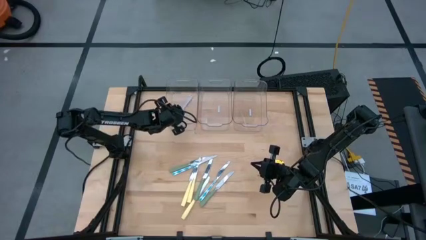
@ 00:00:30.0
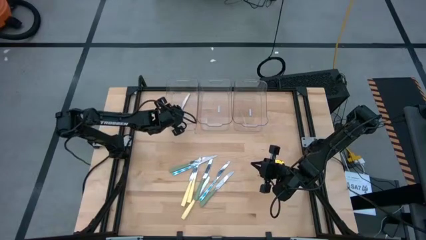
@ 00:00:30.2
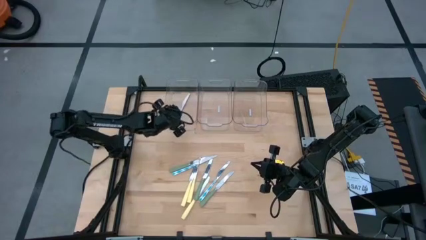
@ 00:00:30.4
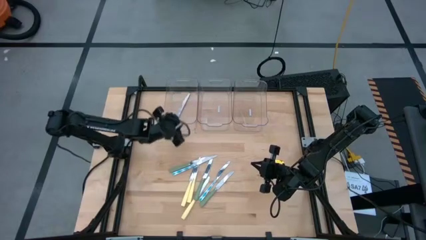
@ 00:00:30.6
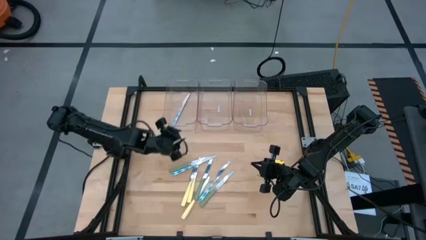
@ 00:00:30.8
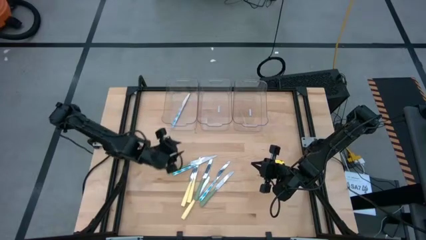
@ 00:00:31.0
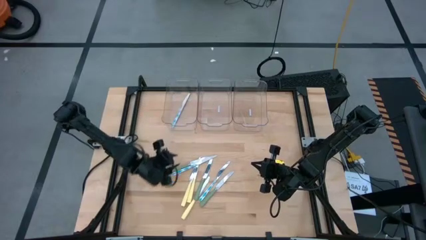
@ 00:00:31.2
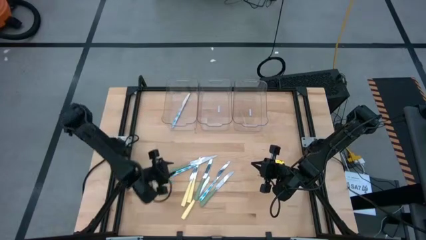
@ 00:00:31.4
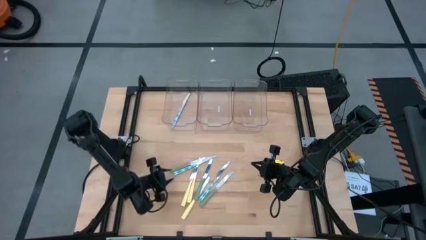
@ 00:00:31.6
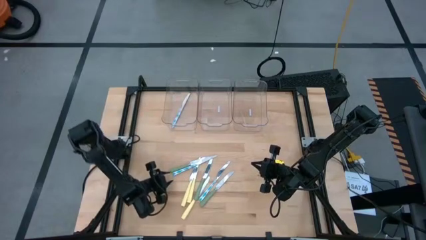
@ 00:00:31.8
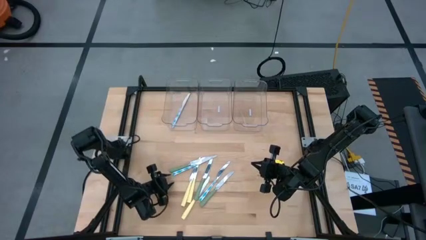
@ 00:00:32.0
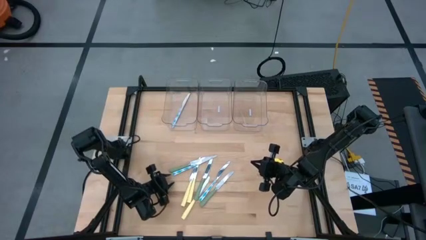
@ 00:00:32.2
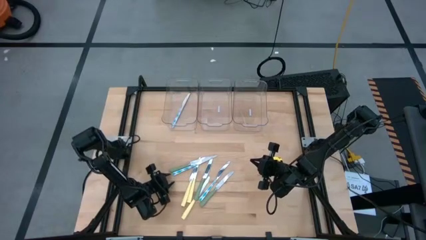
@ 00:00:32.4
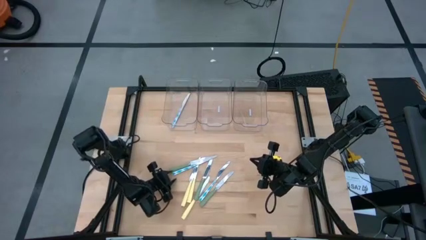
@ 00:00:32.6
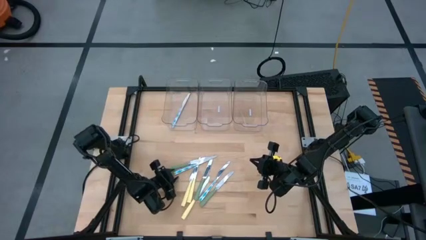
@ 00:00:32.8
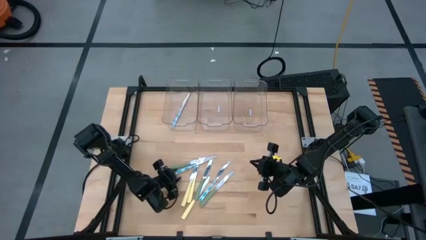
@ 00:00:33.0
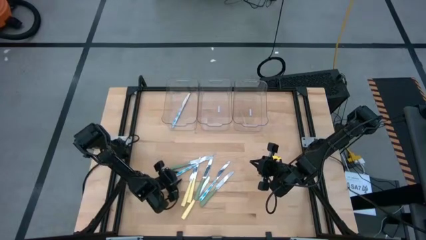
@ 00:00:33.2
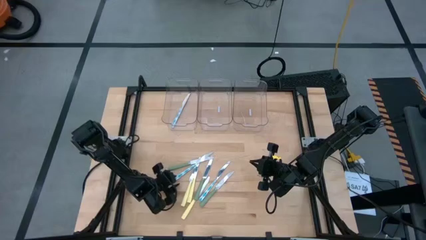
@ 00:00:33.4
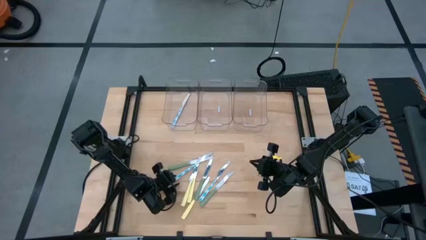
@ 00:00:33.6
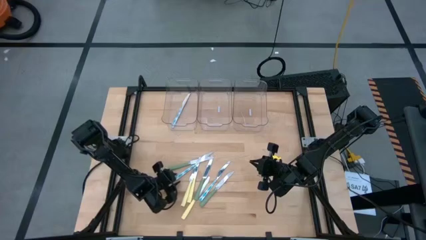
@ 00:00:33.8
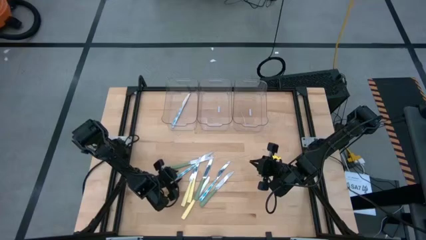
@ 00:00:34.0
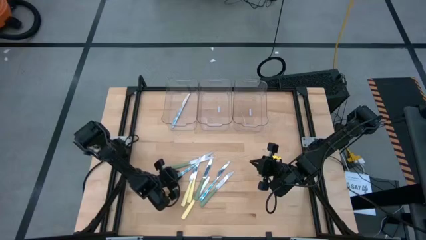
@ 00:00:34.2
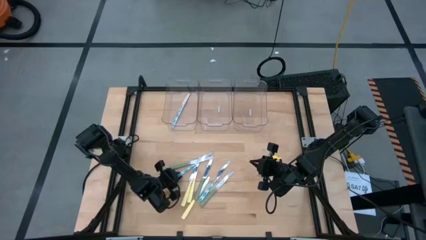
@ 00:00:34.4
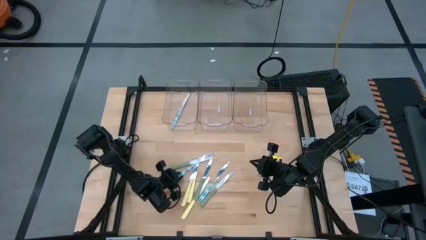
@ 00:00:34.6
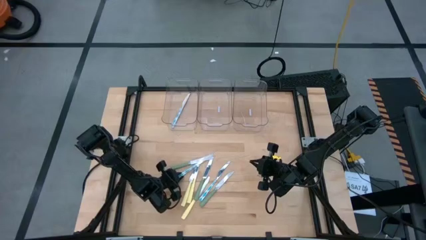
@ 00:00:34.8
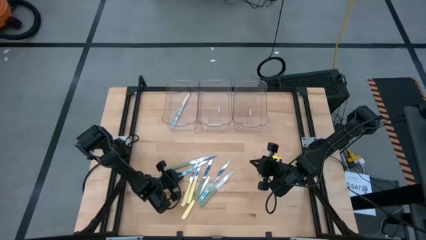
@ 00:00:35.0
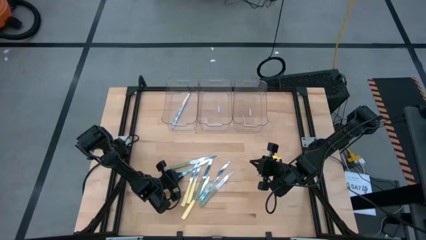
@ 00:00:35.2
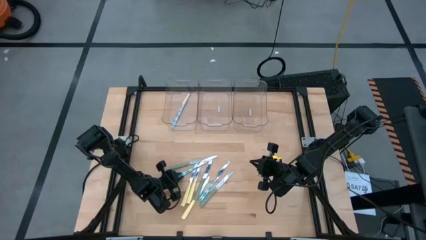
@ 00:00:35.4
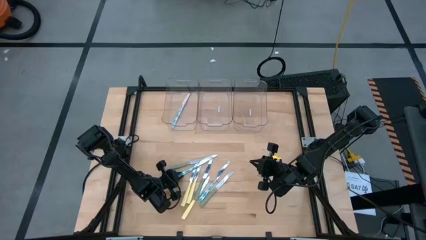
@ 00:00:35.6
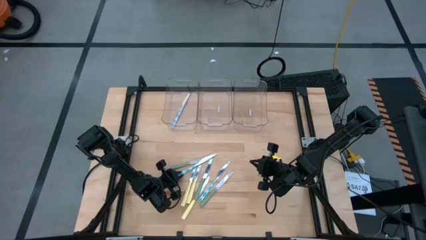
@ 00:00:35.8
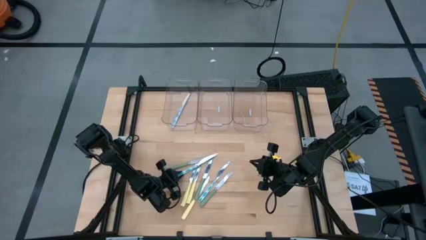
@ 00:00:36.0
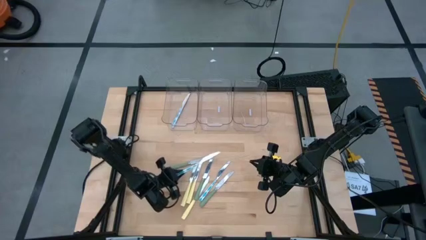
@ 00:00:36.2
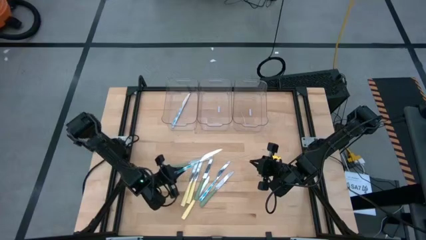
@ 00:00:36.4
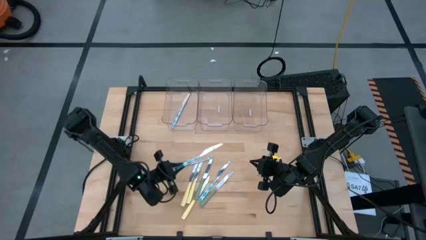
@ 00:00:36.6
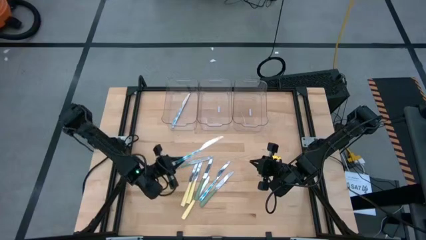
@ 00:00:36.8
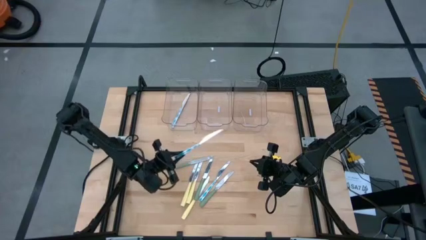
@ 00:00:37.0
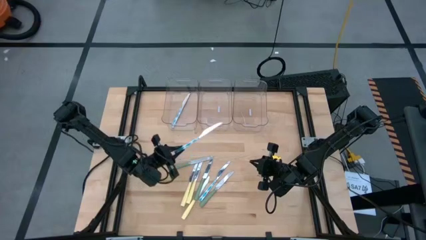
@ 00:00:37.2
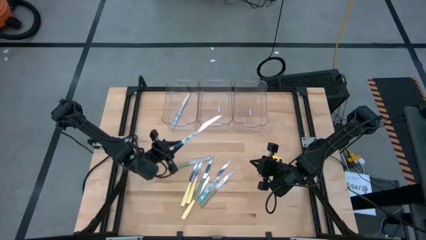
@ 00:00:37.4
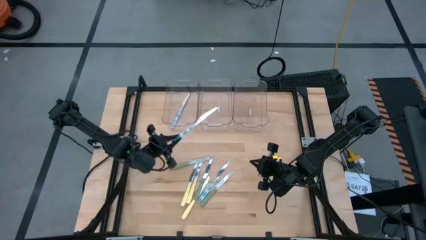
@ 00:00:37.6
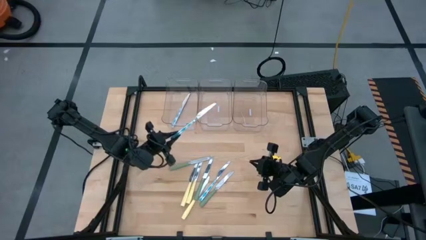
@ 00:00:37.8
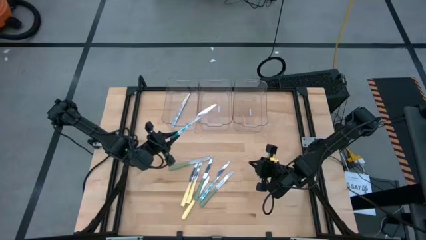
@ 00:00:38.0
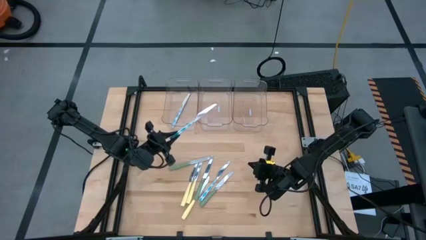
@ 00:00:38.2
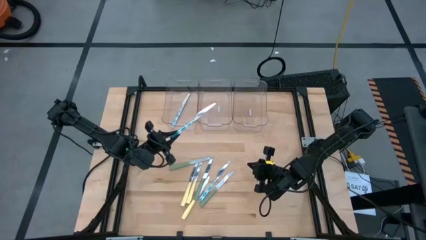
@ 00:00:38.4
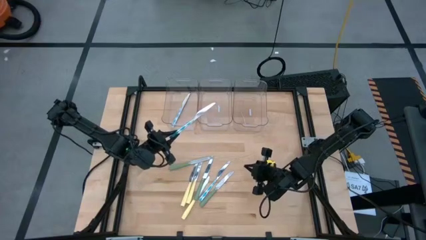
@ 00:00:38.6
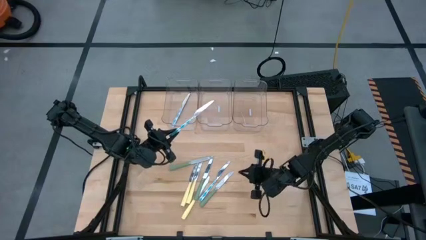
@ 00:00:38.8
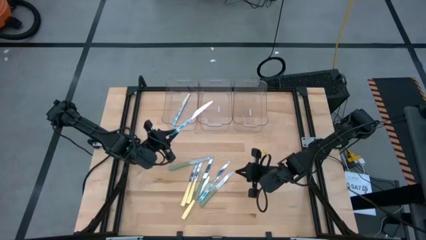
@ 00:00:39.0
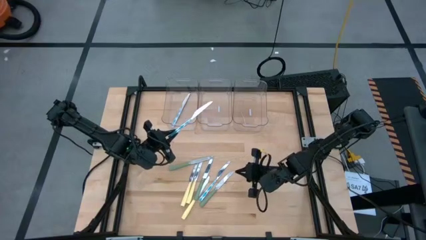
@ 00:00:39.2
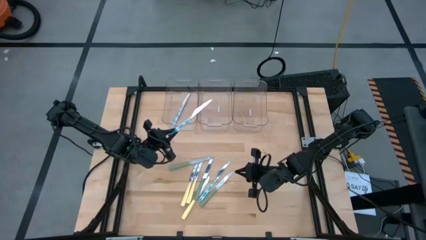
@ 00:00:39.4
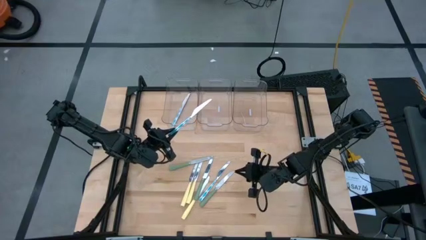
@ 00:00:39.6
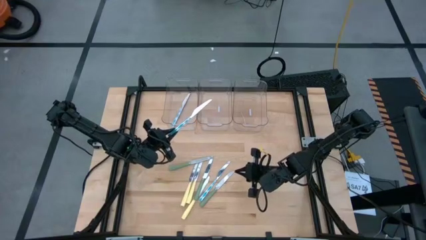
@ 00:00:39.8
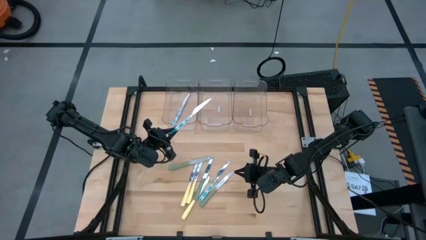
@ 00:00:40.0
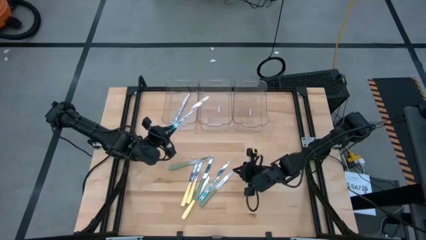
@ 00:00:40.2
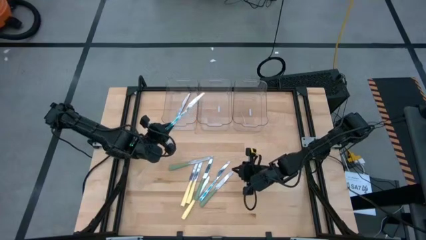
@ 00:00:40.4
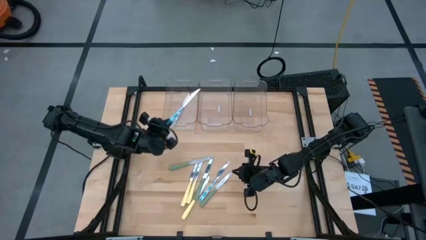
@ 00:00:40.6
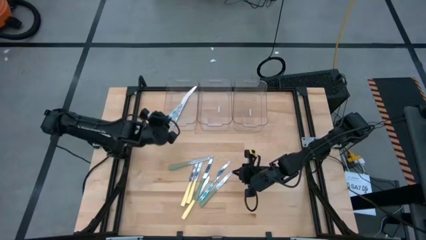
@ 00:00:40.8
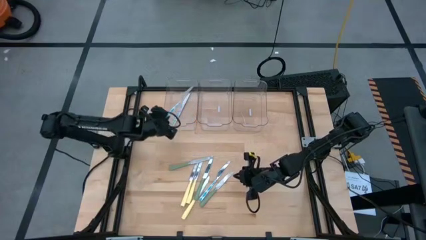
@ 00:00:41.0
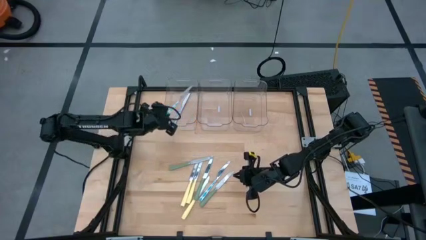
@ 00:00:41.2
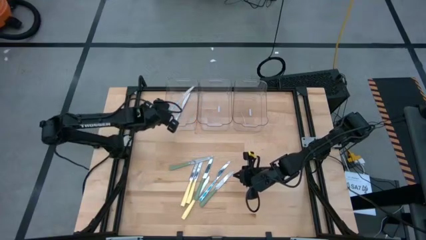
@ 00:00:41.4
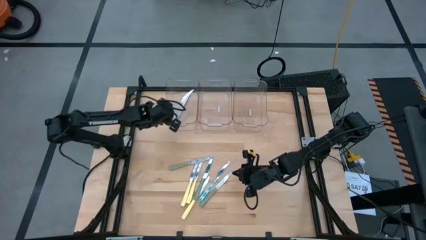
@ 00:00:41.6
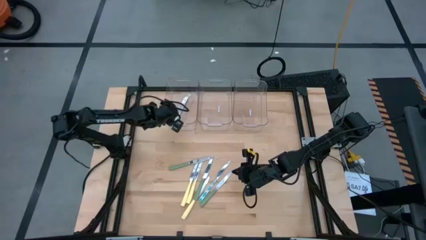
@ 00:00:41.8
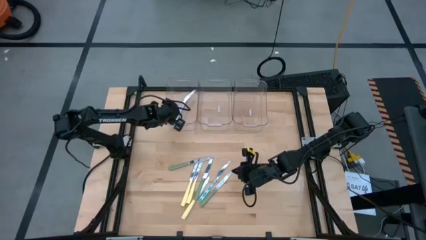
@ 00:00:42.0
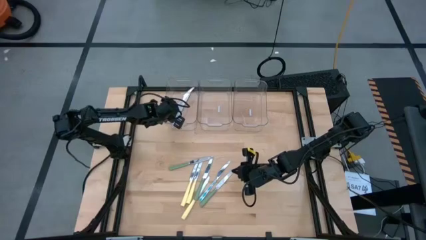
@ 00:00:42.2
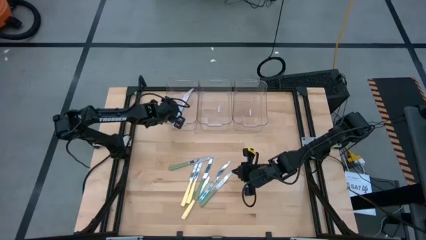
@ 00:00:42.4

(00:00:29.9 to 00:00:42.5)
Task: Sort silverware by color (type)
Put the blue patterned knife into the left transparent bin

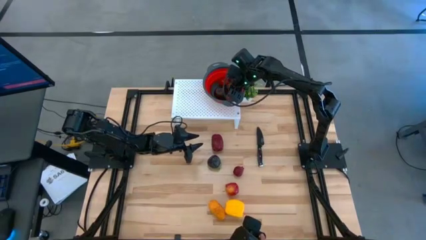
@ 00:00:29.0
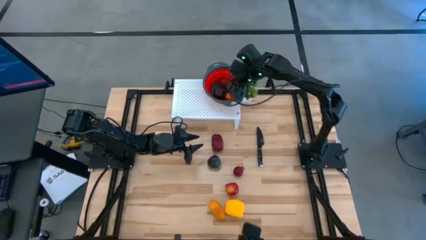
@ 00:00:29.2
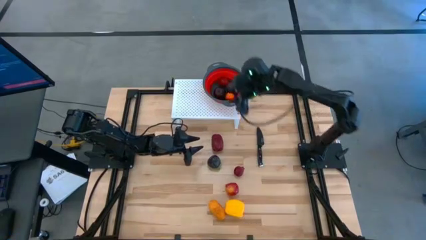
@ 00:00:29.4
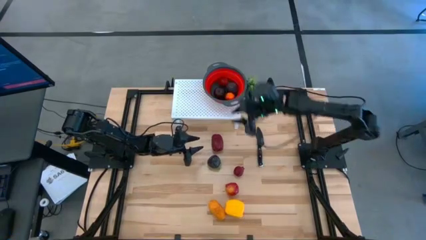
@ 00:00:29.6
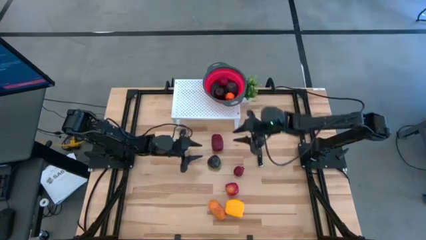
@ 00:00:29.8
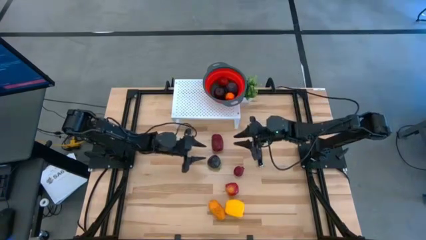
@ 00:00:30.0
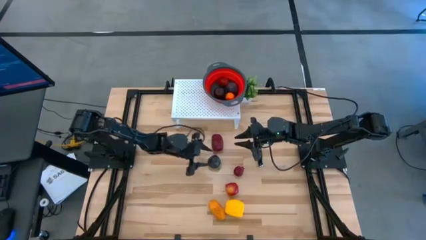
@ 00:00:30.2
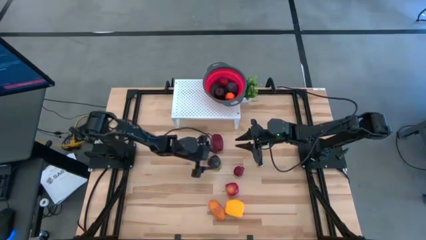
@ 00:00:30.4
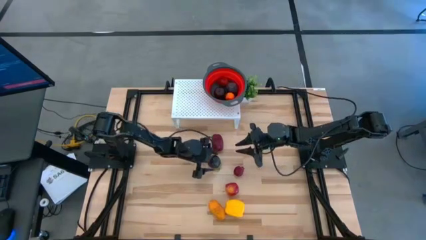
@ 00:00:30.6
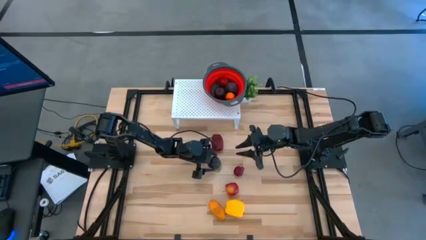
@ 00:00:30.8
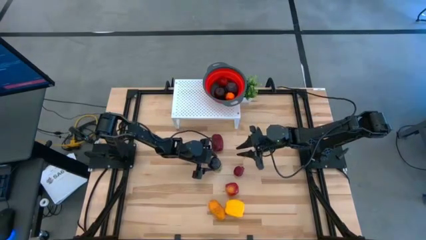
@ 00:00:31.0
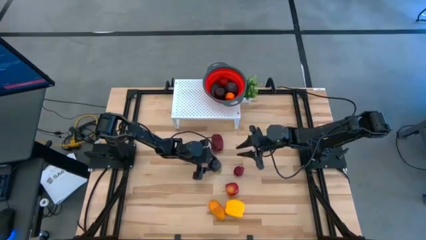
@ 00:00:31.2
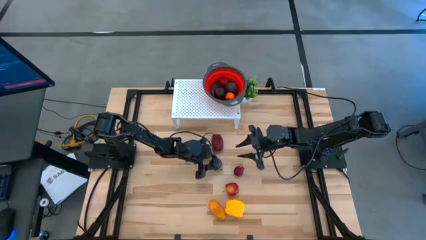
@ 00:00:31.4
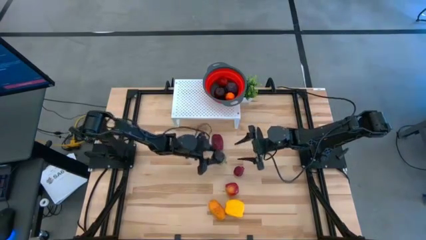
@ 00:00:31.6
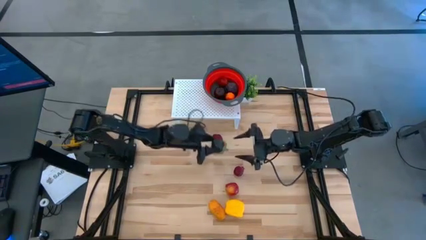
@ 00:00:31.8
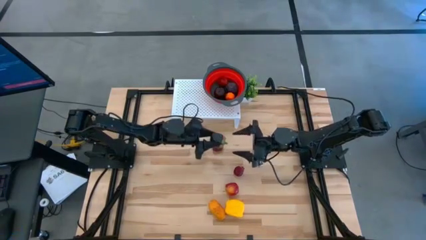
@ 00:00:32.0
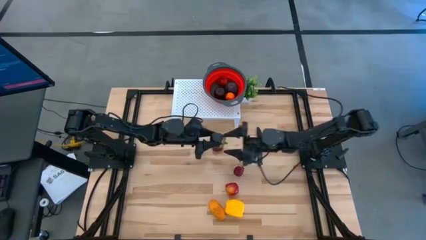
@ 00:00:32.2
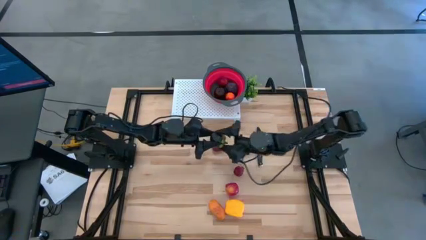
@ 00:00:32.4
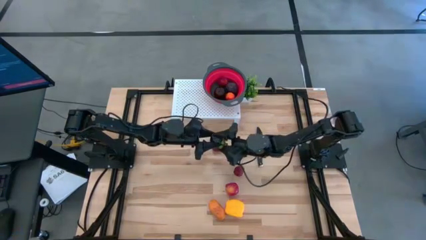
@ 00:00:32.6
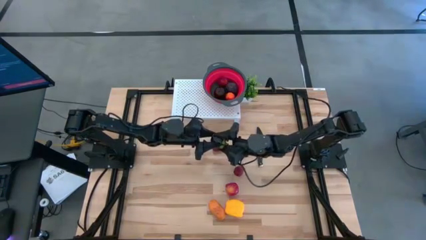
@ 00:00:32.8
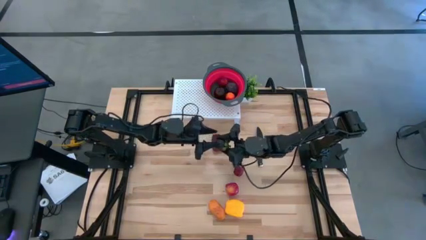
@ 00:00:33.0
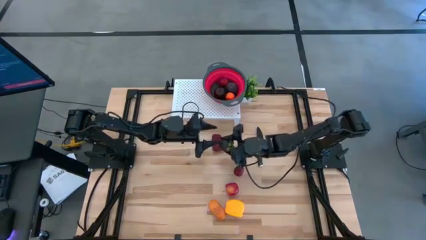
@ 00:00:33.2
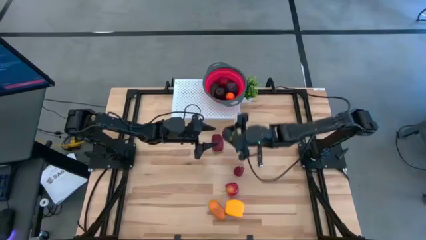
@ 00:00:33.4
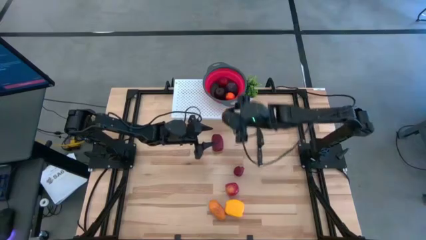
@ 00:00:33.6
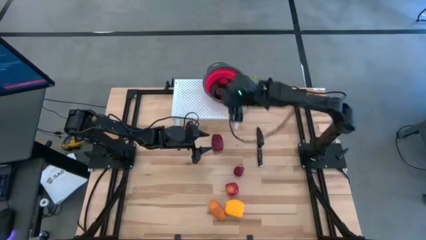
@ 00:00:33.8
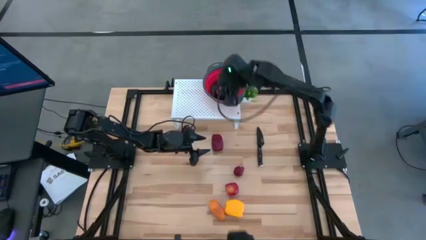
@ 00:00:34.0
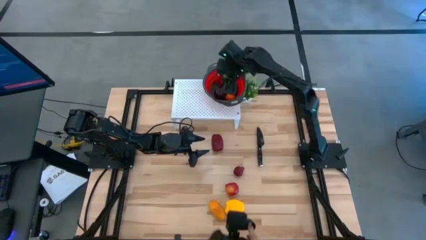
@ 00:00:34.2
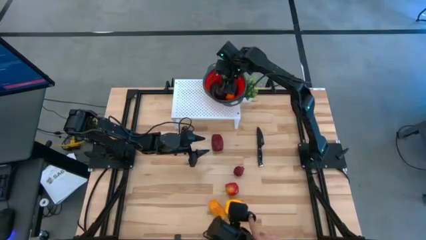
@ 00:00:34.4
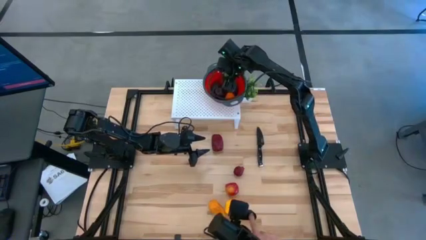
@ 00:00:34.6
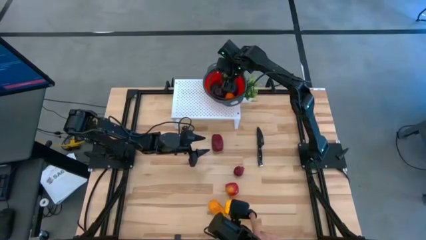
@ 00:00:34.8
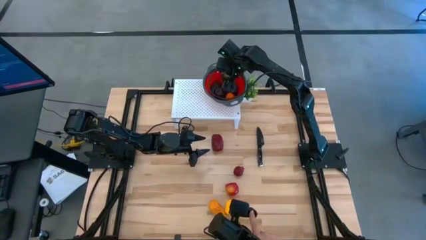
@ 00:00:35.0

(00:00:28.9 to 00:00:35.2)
Task: Pick & Place Fruit
Put the purple mangosteen into the red strainer bowl
